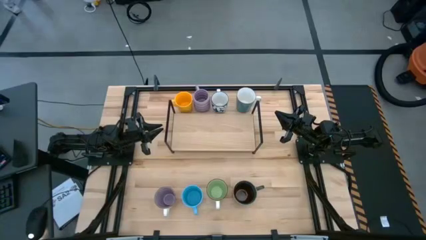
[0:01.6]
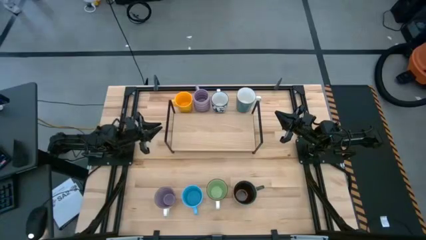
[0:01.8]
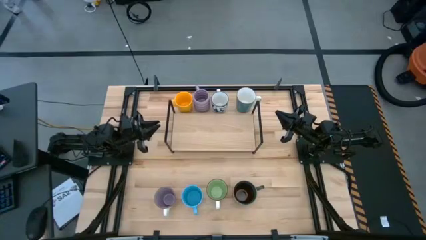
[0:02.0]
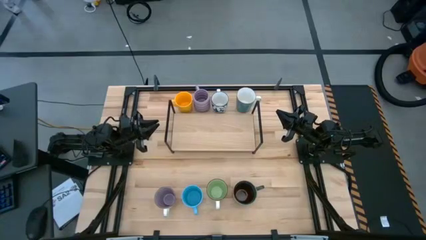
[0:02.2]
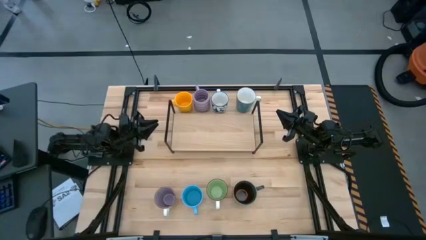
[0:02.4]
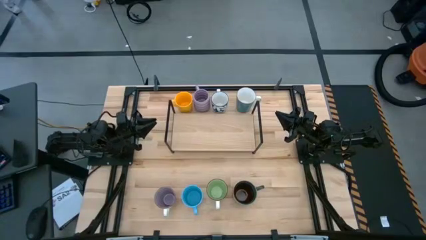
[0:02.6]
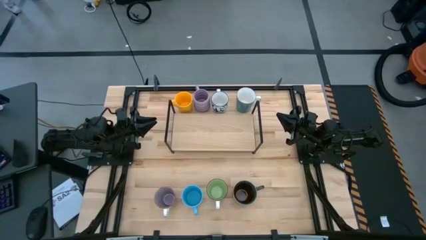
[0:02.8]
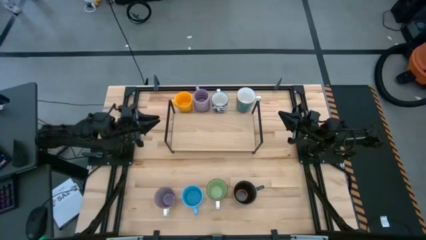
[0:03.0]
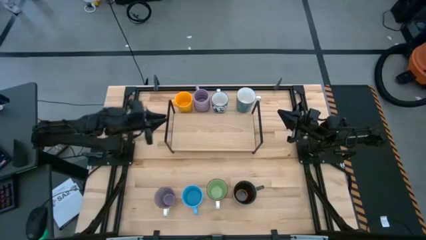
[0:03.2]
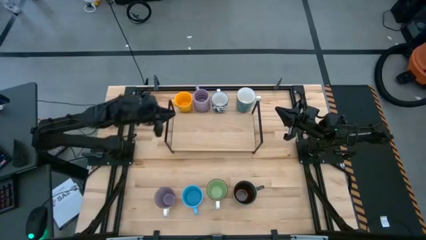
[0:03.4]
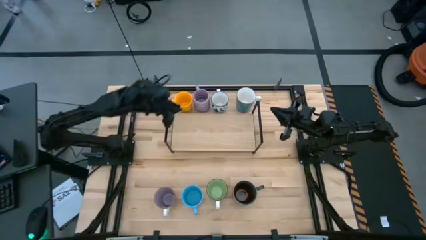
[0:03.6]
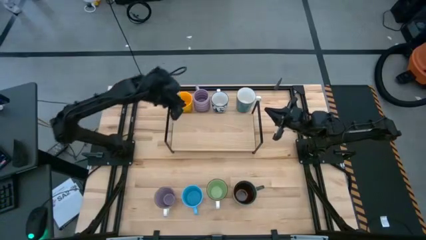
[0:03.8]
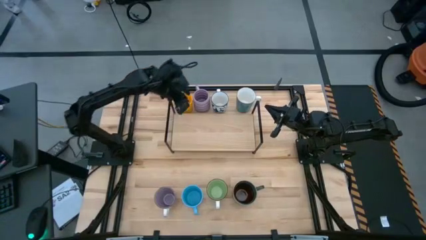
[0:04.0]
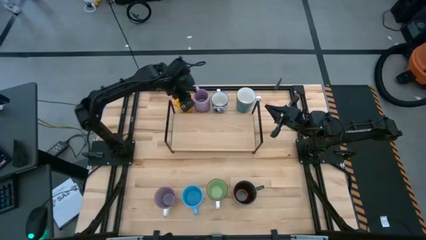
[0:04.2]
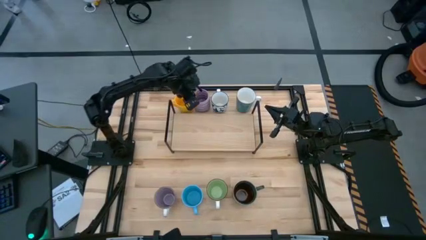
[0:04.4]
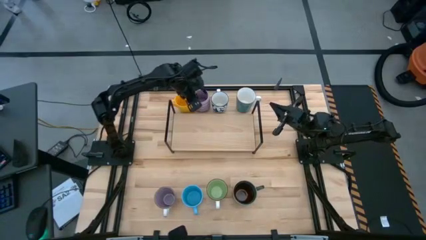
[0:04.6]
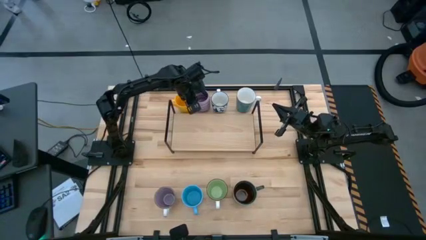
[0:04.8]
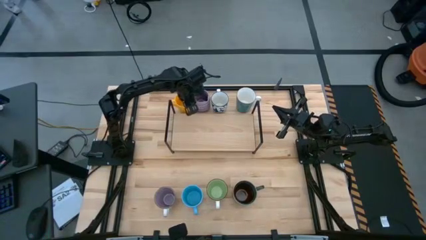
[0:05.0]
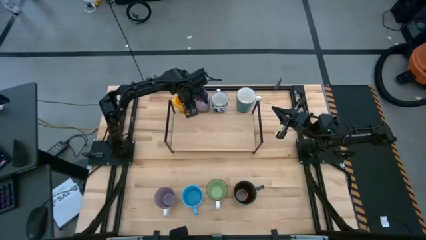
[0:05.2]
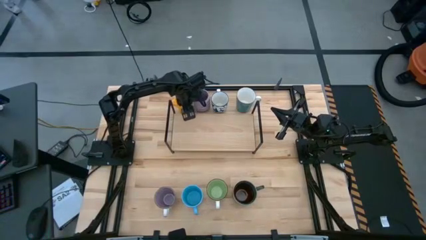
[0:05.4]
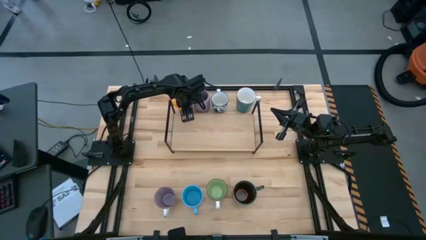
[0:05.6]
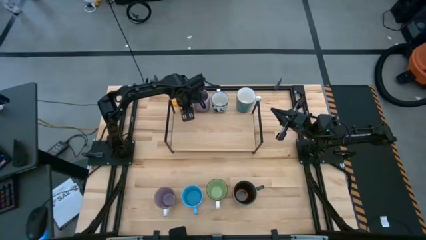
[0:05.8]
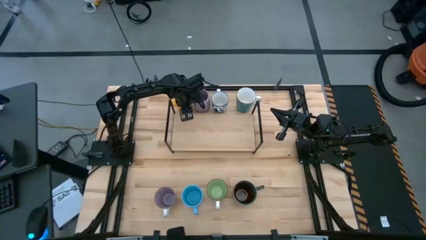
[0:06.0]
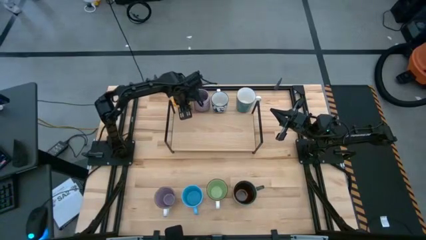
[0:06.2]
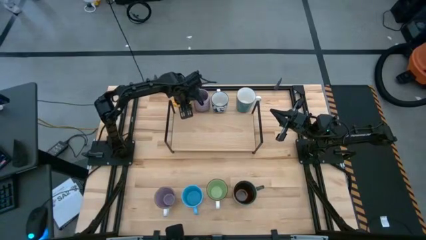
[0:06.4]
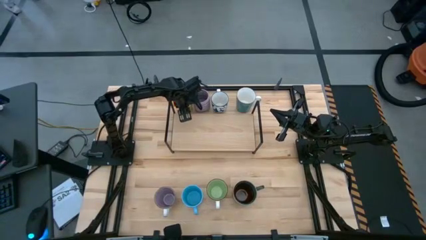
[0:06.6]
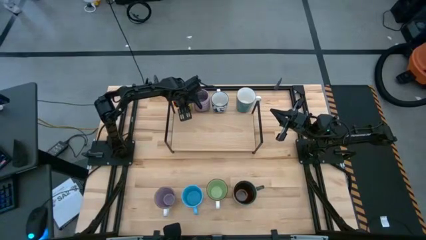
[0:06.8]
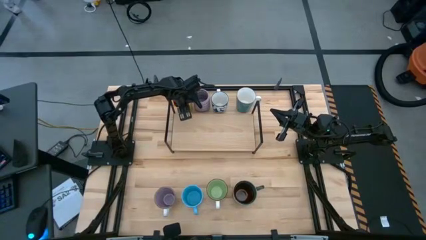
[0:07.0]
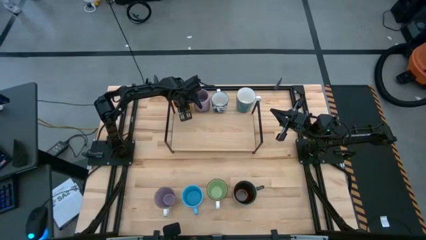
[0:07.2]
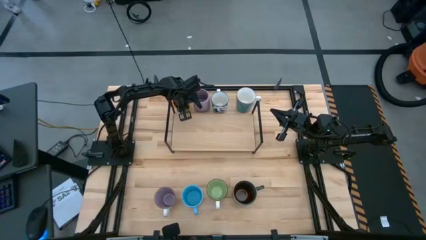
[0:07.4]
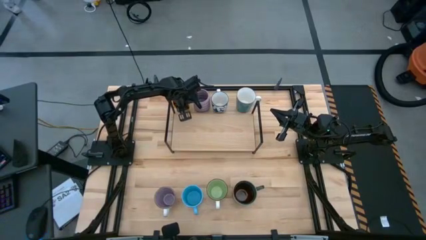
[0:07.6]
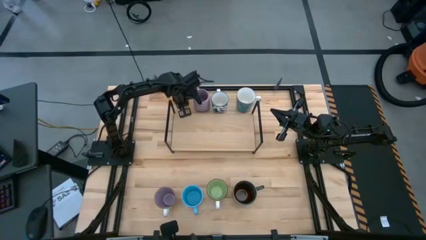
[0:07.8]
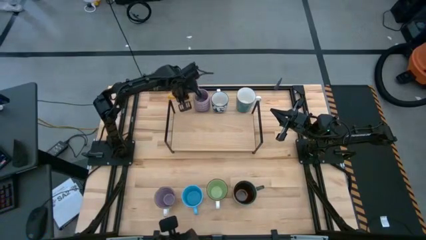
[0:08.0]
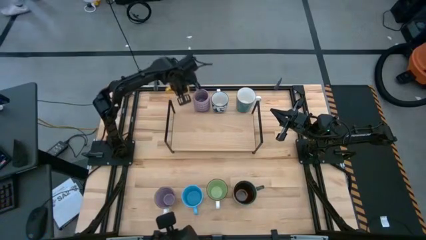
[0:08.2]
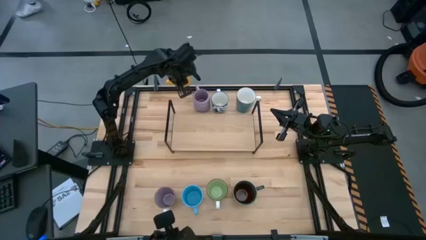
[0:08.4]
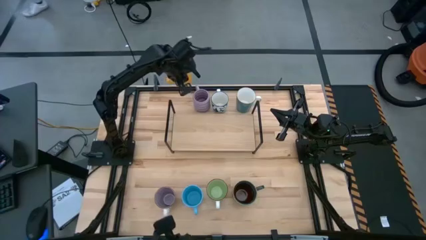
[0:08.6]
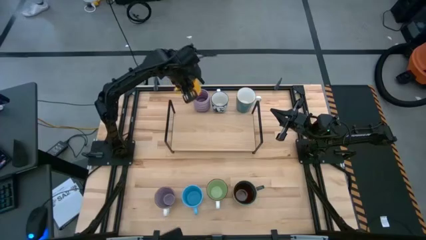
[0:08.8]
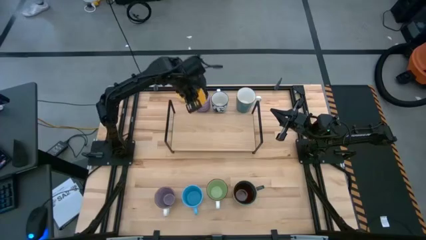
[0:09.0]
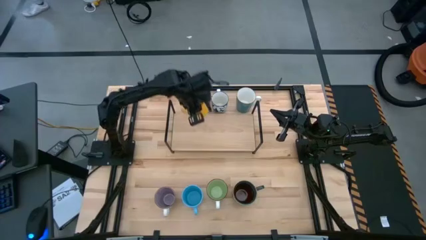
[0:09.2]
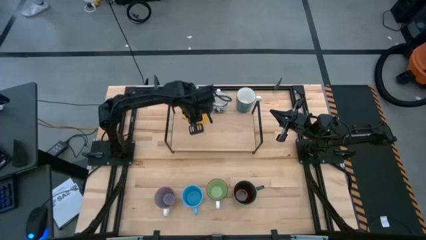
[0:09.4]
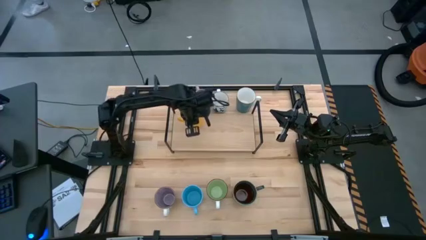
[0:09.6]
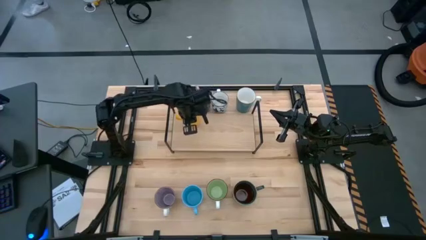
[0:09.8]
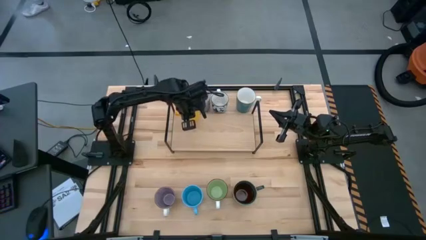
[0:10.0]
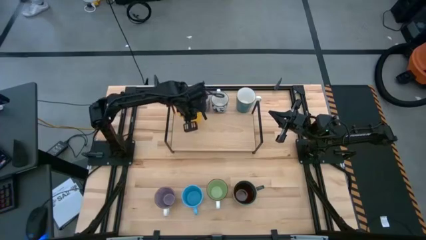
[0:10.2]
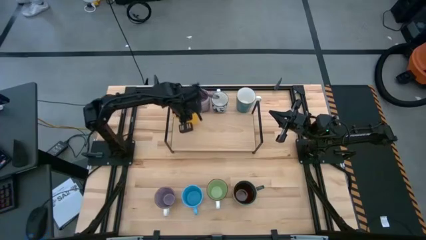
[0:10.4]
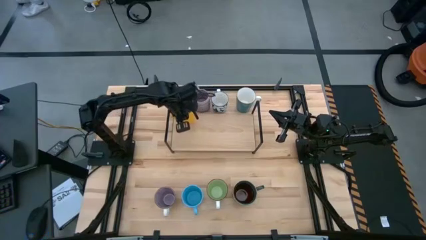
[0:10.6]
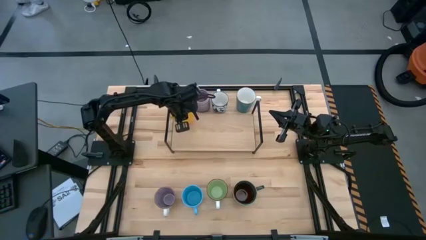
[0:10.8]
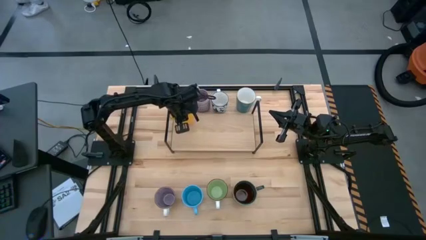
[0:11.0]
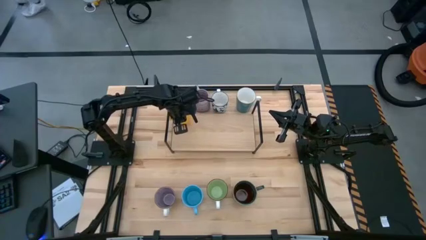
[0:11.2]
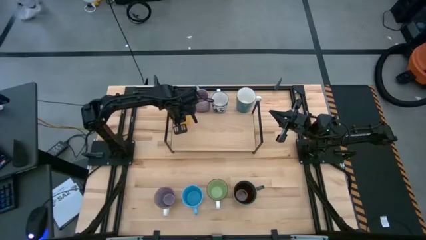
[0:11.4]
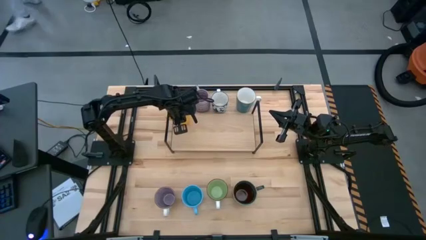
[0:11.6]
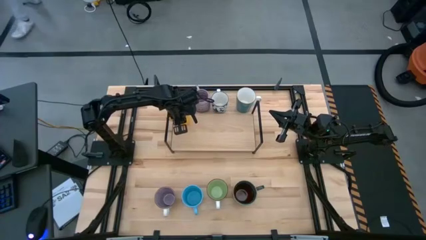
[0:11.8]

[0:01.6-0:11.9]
Task: Place coffee mugs
Put the yellow mug on the shelf

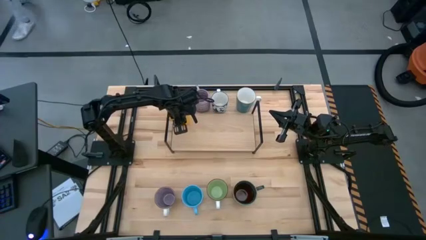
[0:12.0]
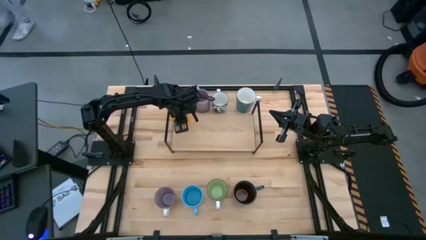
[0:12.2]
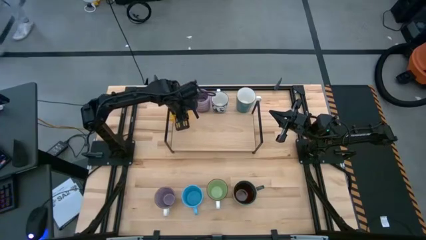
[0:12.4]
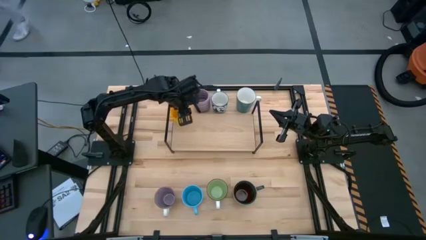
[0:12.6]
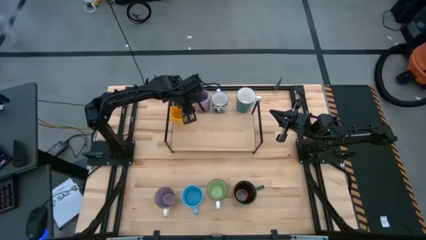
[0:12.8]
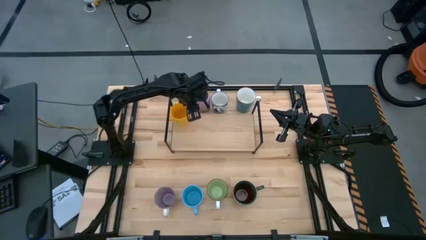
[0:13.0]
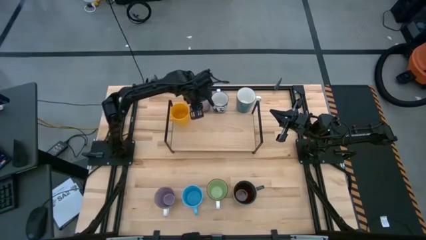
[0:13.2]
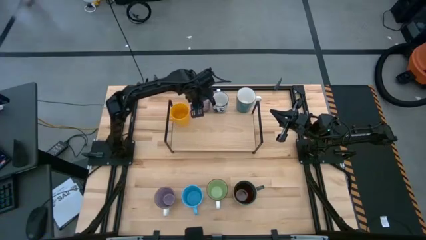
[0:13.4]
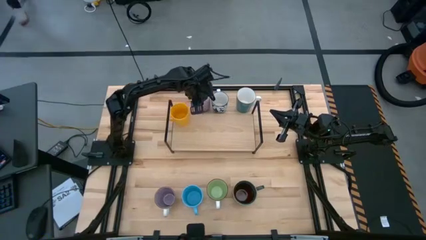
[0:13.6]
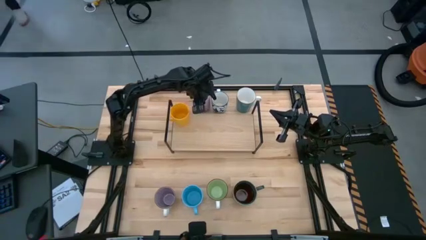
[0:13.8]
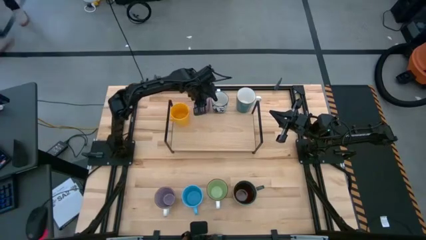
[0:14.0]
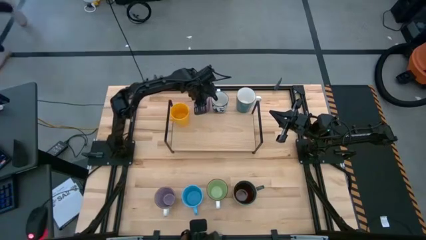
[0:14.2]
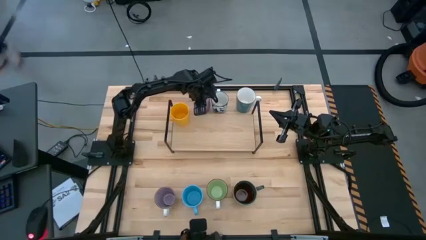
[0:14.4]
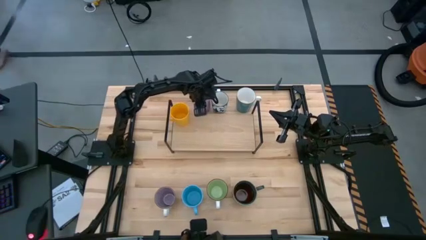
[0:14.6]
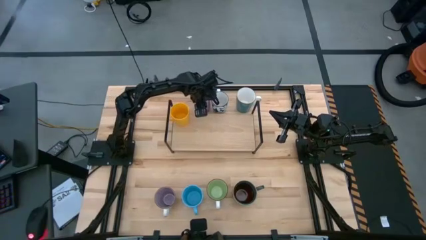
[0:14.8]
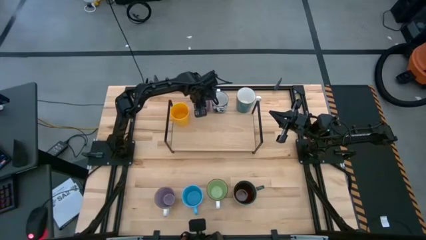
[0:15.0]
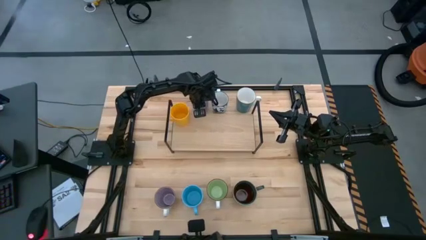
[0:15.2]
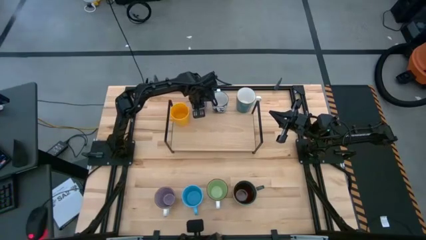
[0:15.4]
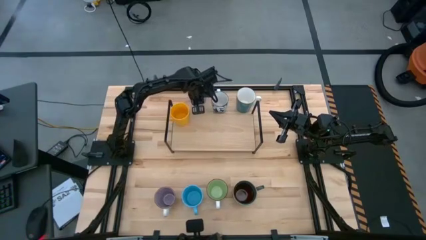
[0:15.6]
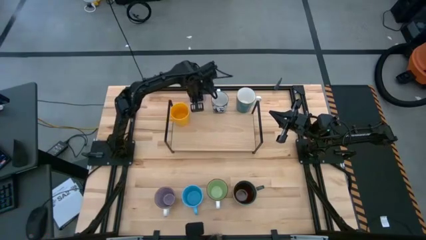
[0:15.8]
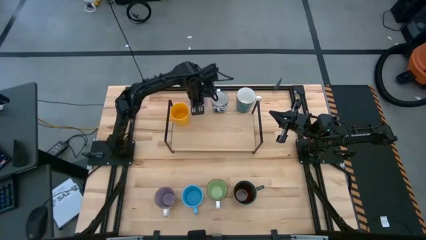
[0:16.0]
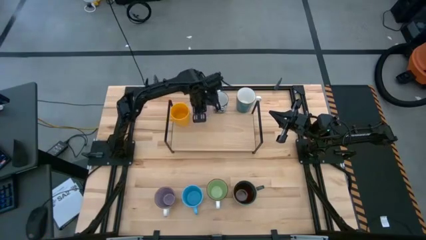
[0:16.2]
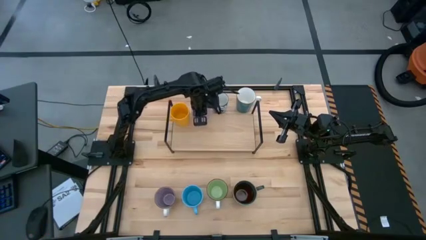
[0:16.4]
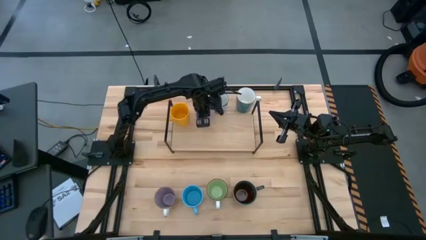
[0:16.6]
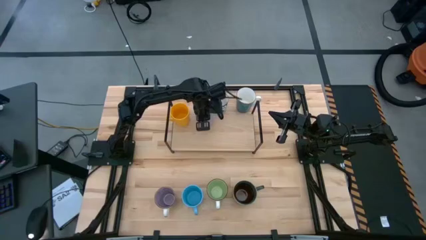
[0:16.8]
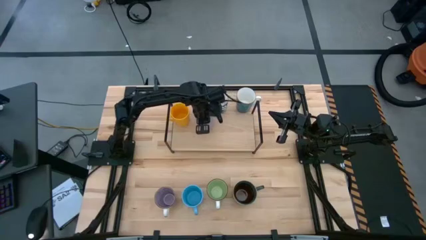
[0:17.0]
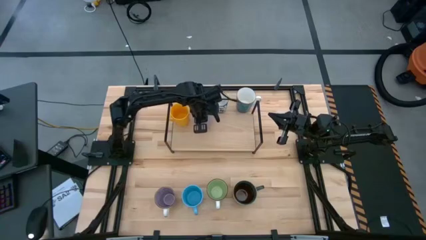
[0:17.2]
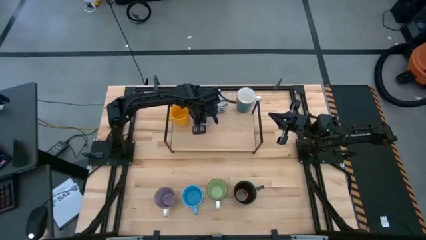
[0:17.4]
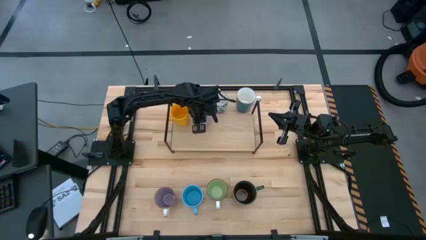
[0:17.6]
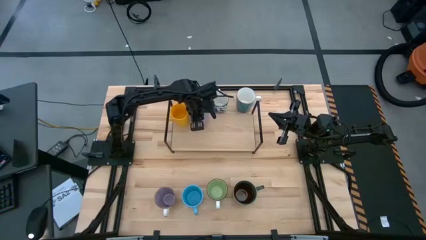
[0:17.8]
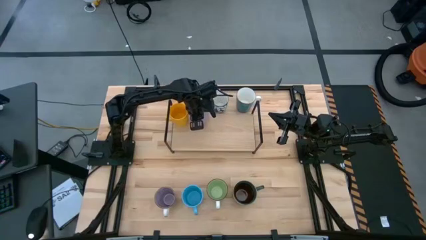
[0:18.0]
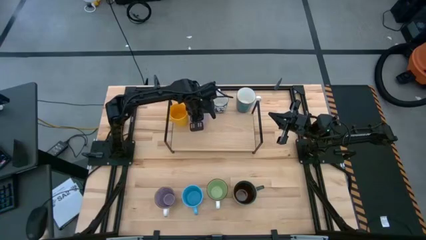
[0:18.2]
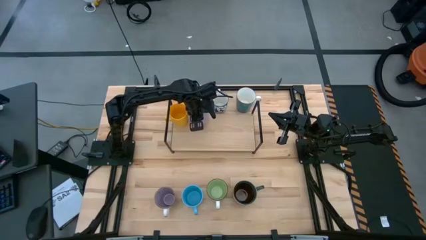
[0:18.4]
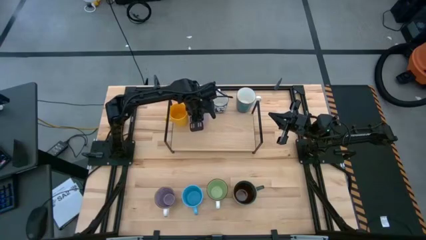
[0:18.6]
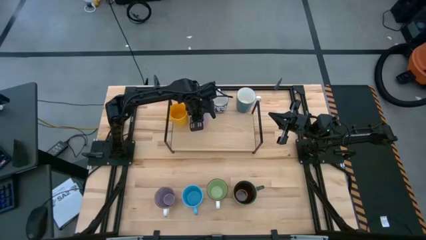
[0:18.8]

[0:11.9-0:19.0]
Put the light purple mug on the shelf
